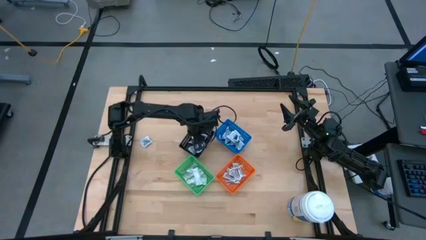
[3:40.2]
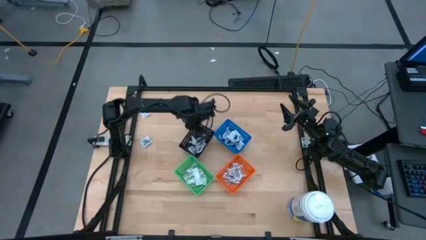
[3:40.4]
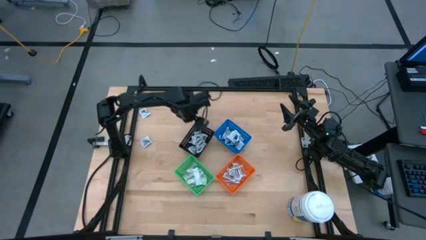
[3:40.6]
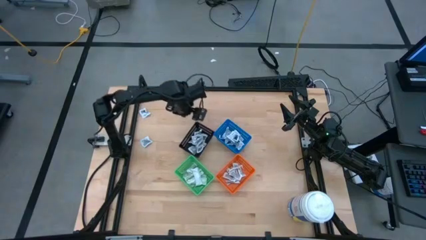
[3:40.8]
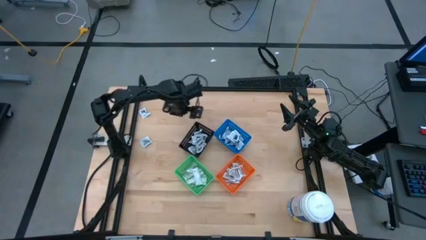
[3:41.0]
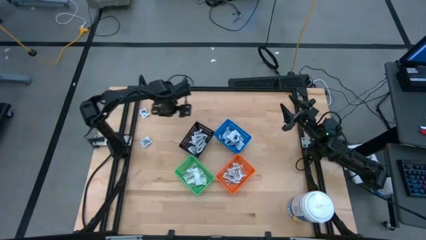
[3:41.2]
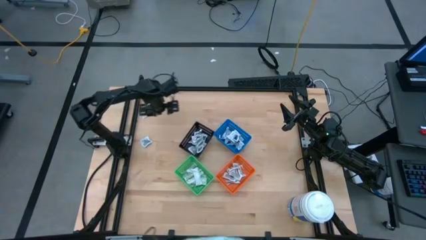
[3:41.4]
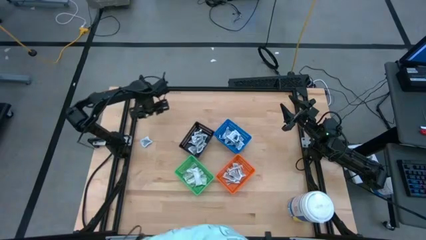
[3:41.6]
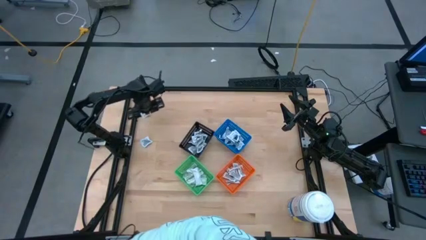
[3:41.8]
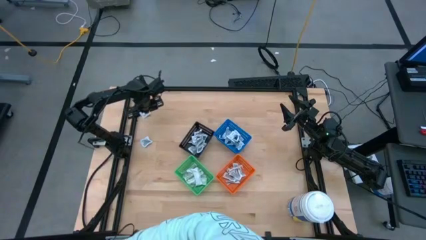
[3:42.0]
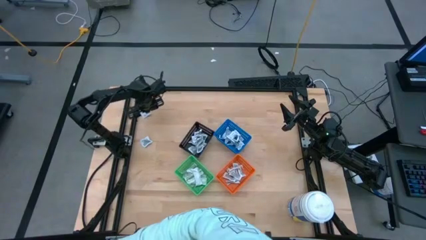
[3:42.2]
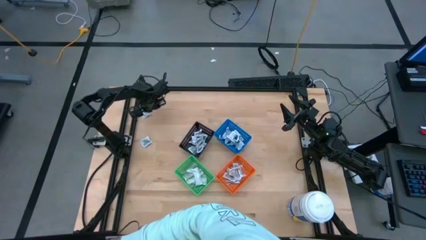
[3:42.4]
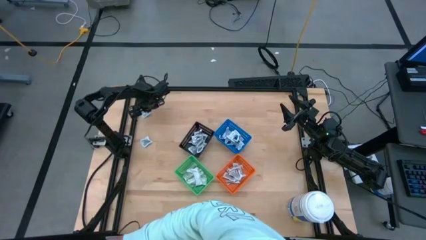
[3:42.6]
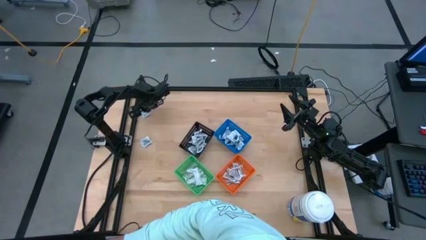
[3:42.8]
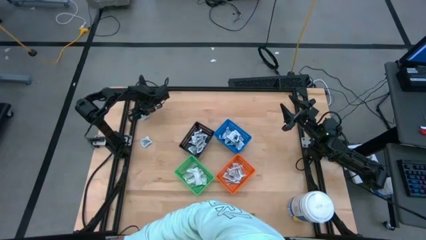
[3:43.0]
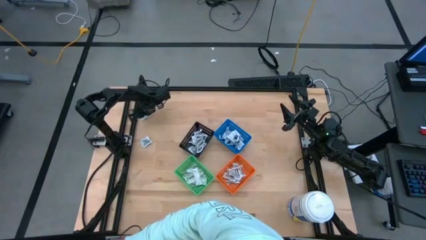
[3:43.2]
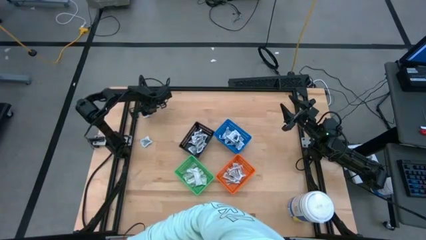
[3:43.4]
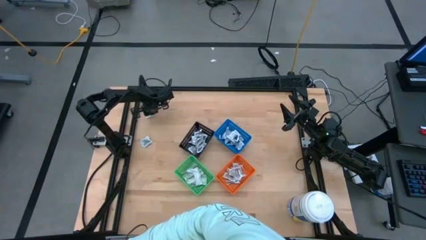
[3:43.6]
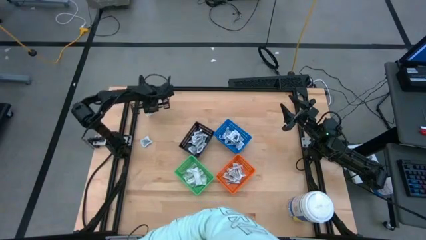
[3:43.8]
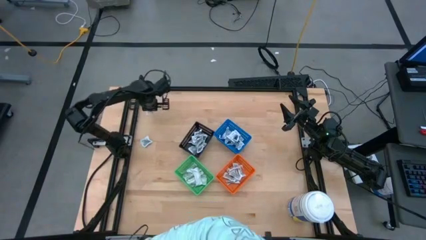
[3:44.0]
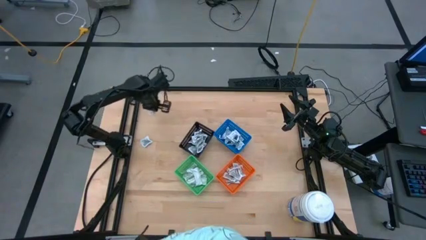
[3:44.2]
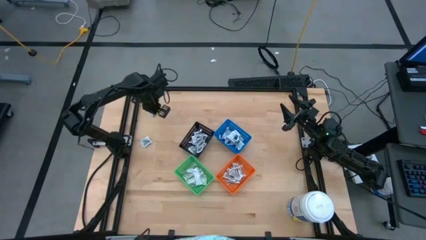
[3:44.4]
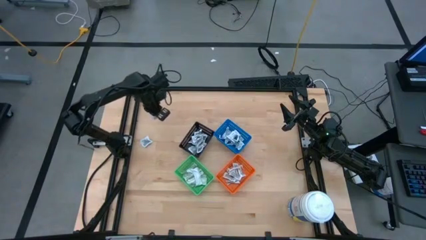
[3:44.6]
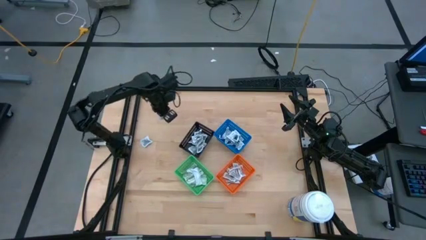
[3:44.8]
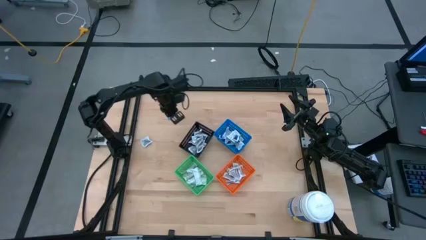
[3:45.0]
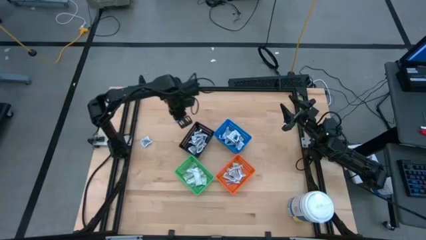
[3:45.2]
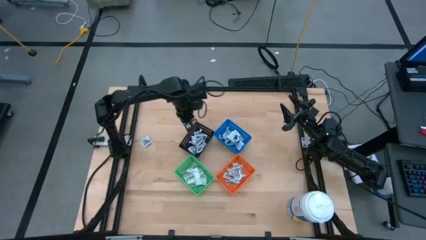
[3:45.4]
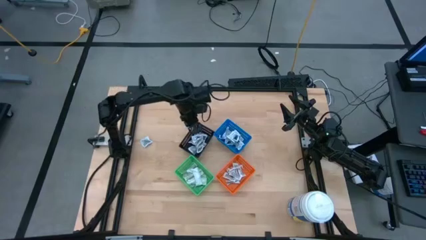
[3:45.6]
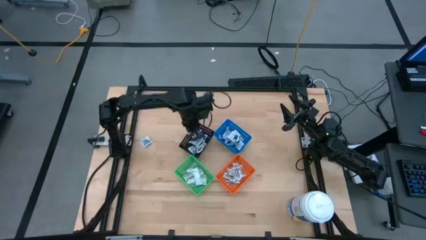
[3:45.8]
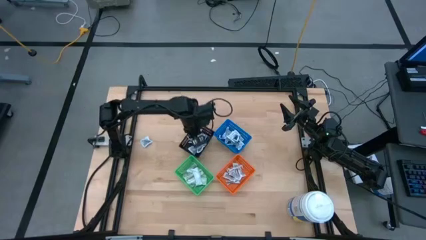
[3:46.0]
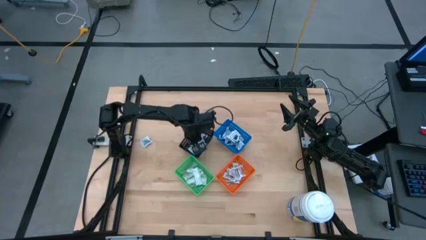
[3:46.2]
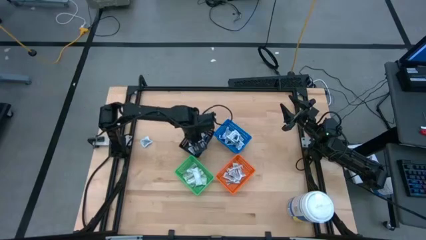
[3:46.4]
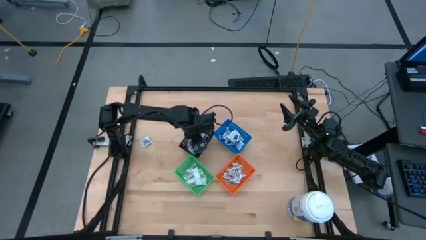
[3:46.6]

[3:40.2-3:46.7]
Task: Pick & Place First Aid Supplies
Put the black towelette pack into the black bin

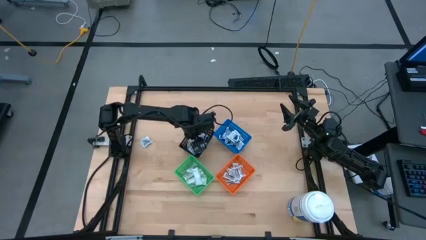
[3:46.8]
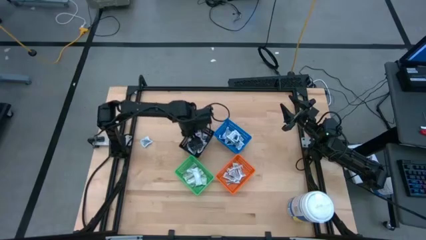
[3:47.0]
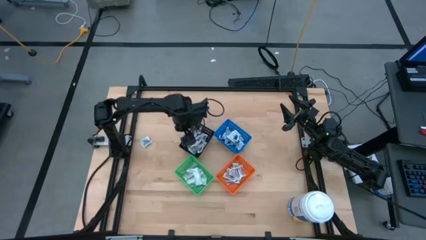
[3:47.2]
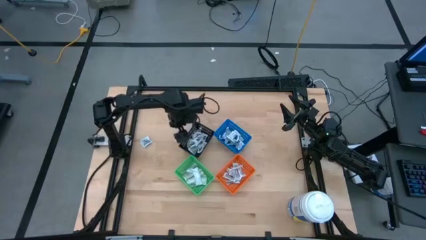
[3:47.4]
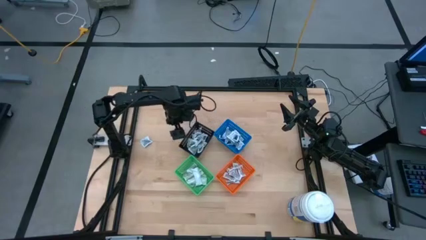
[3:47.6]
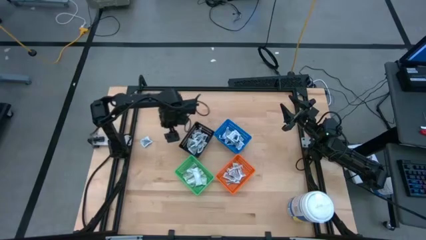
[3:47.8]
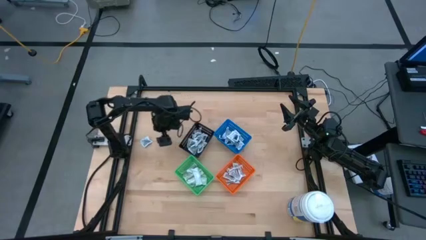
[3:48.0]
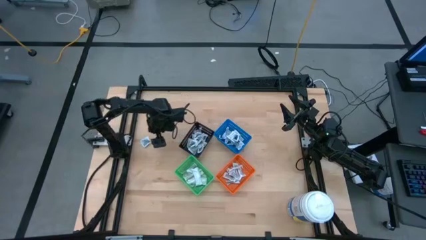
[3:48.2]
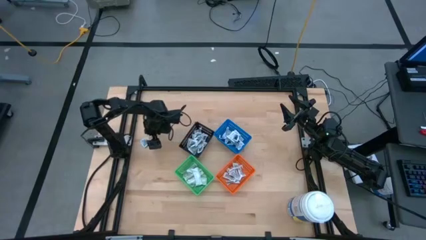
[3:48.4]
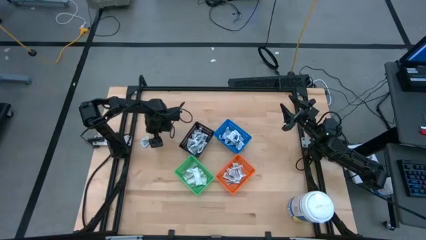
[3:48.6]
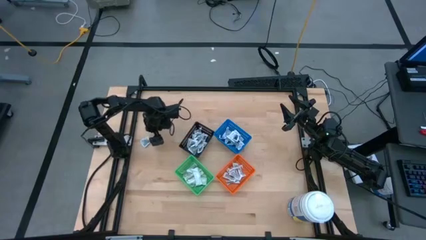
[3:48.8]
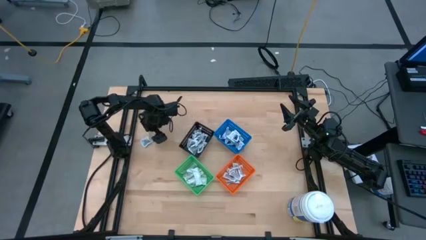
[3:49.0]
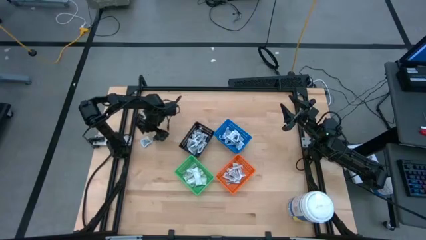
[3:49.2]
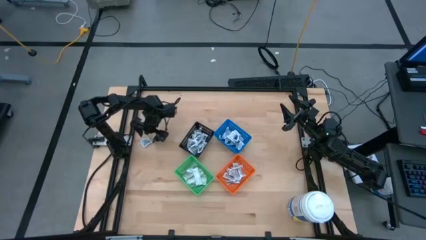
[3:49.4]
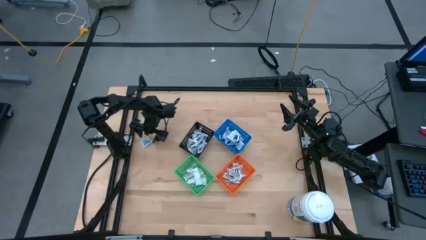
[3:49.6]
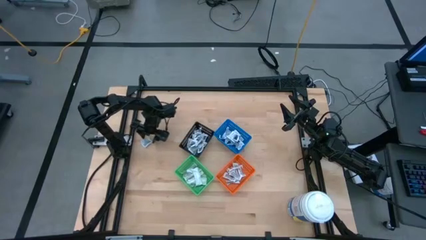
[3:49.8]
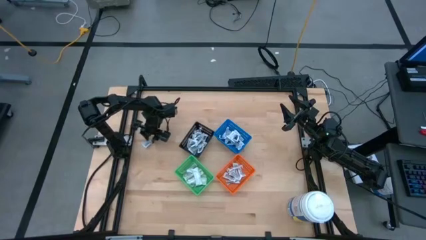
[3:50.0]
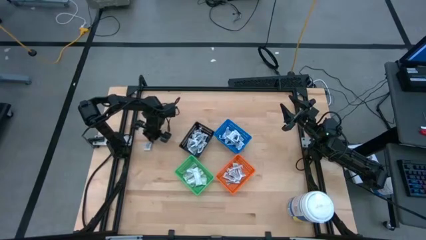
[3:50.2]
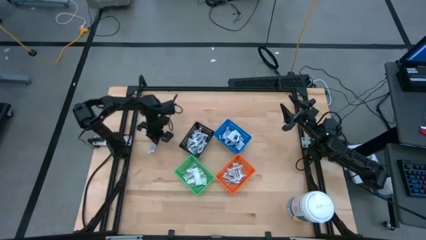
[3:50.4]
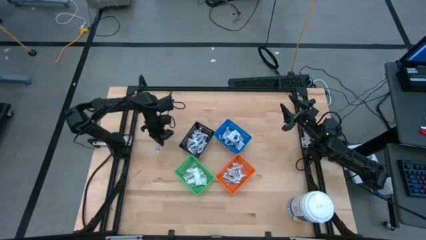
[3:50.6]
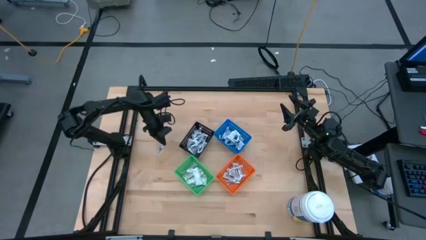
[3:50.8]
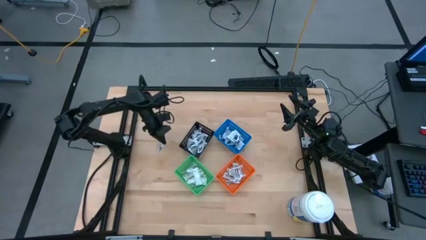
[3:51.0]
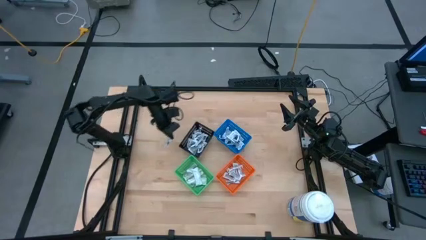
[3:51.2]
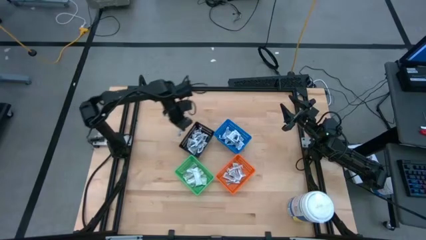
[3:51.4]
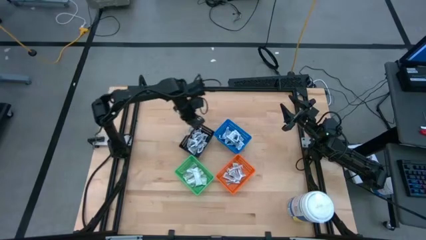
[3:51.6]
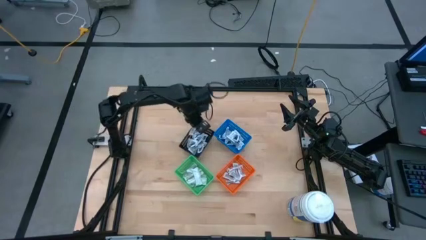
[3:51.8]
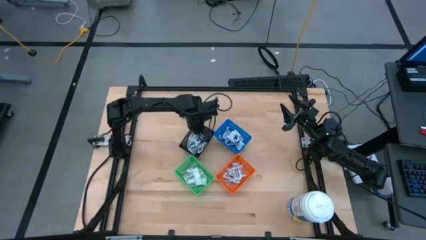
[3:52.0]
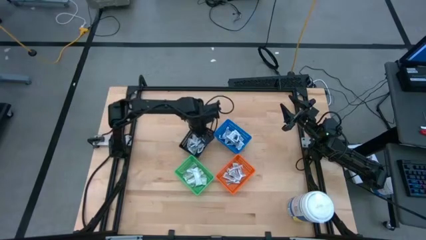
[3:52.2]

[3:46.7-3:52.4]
Put the black towelette pack into the black bin

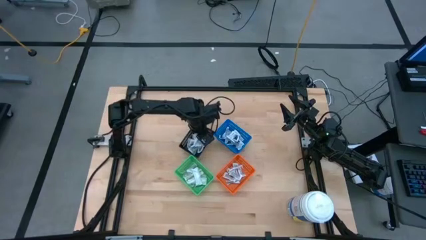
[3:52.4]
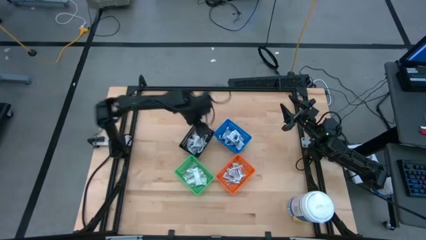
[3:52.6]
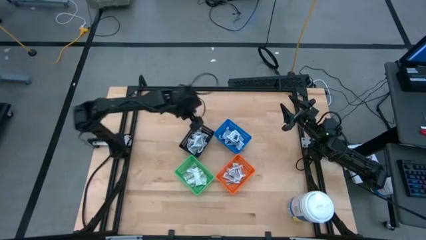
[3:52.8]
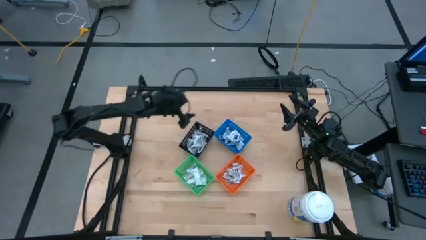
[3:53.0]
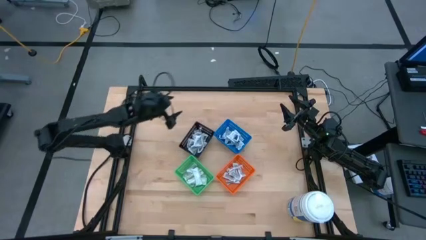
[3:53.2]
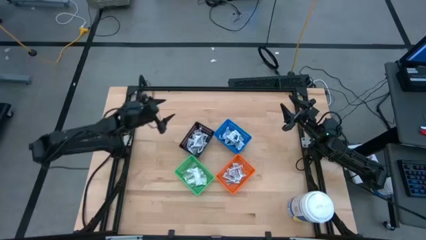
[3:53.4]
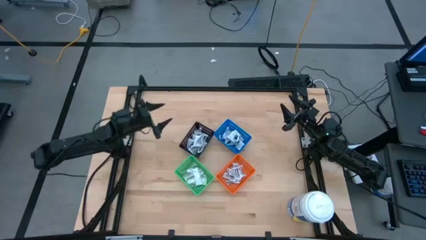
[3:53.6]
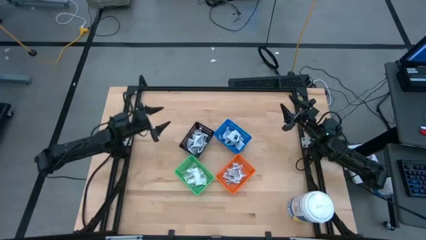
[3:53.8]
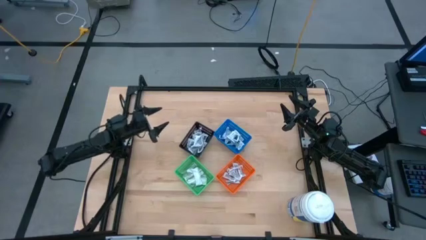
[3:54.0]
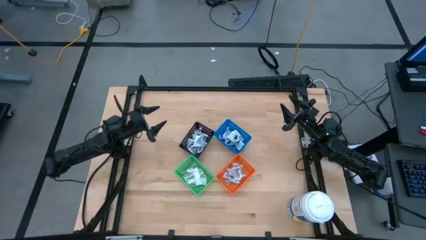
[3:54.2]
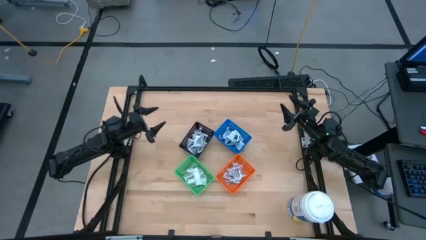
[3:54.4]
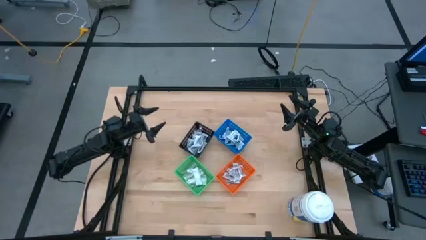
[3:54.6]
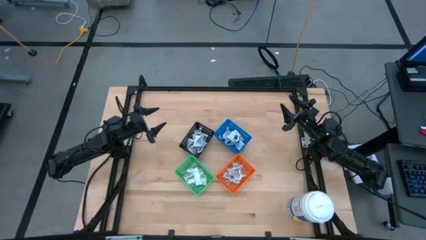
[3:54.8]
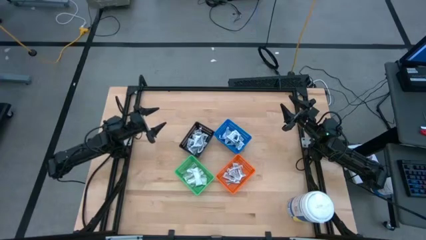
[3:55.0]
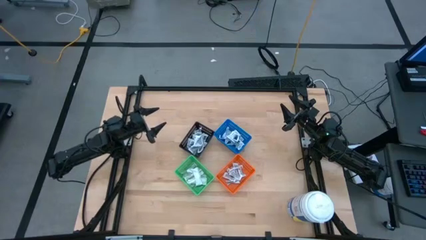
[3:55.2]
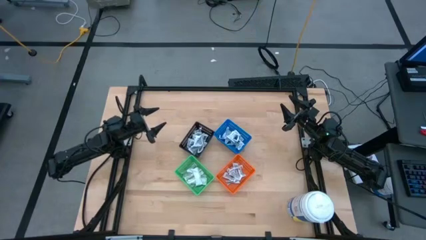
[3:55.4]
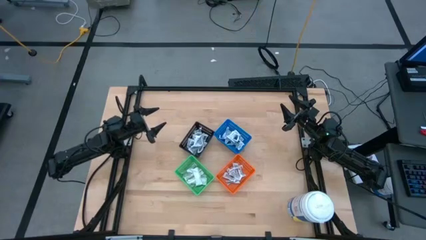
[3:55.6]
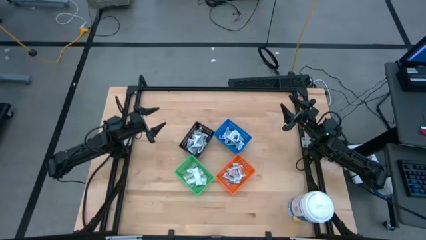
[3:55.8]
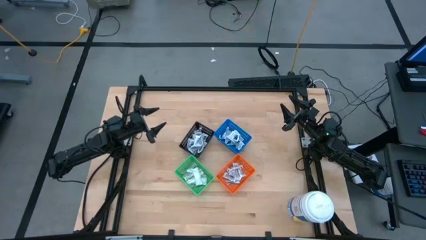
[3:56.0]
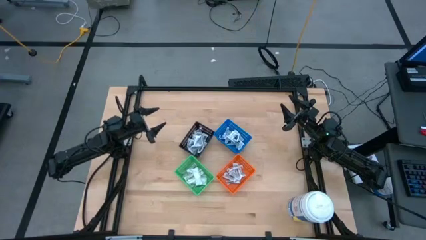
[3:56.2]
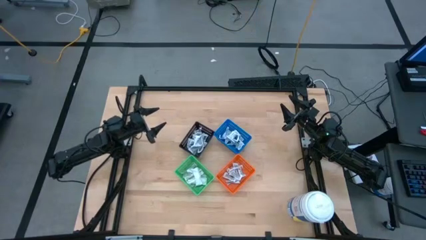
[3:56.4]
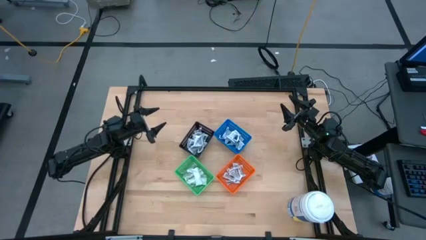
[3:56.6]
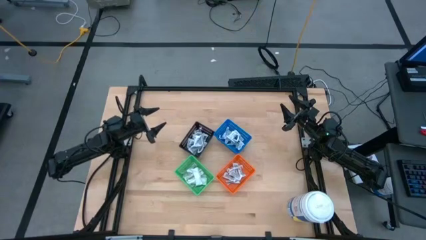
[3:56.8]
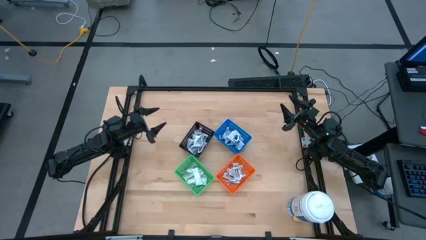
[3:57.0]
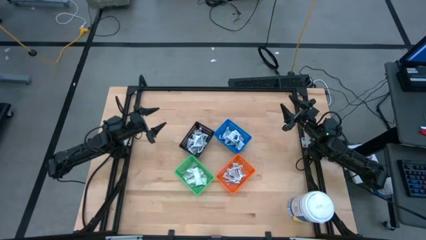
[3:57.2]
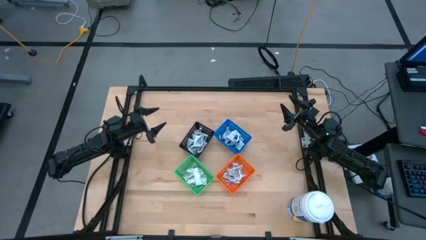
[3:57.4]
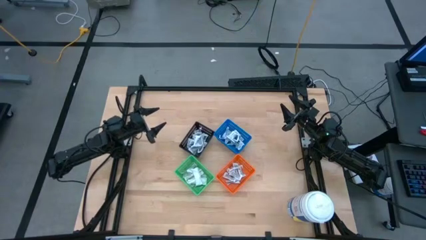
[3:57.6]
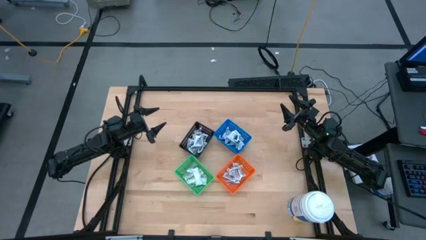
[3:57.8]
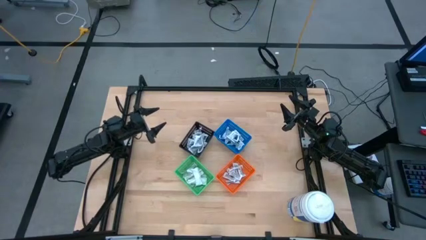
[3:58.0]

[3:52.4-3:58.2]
Return to Home Position
